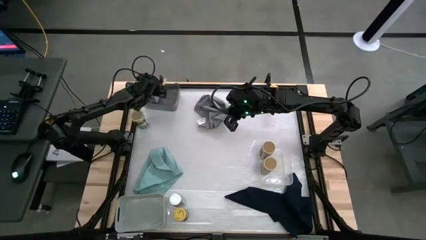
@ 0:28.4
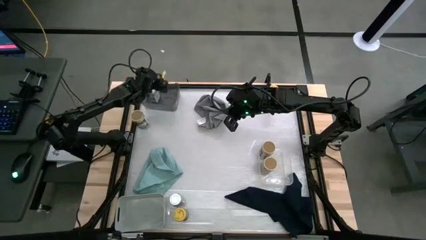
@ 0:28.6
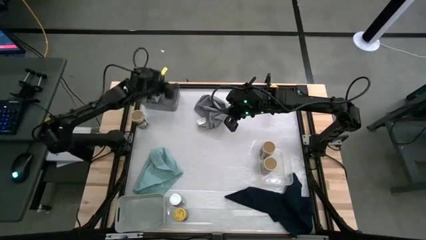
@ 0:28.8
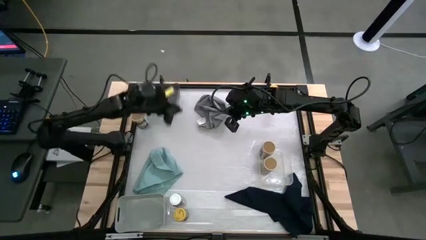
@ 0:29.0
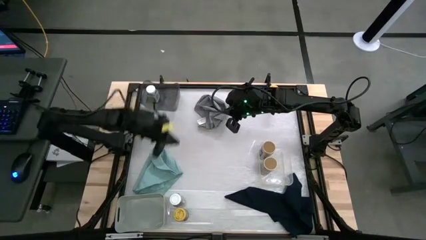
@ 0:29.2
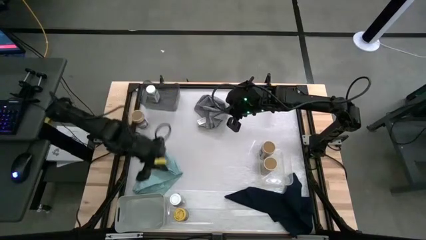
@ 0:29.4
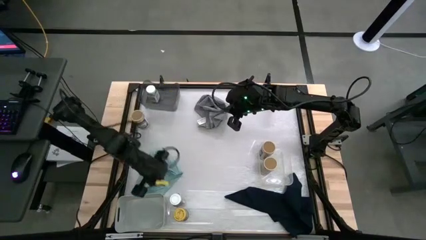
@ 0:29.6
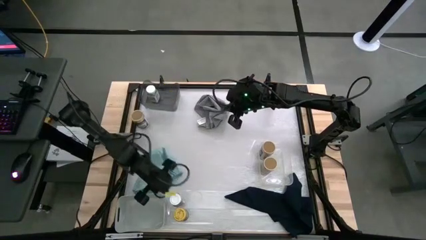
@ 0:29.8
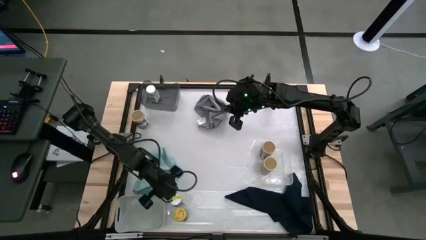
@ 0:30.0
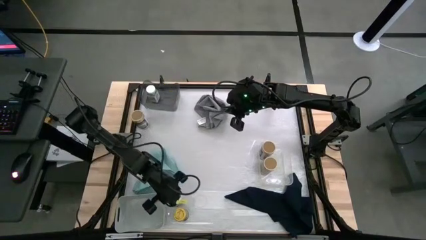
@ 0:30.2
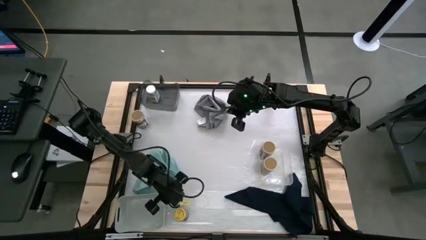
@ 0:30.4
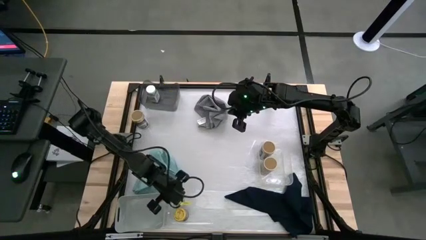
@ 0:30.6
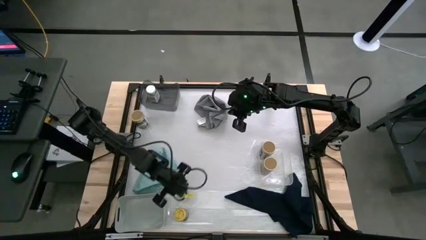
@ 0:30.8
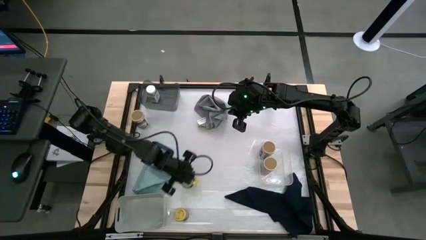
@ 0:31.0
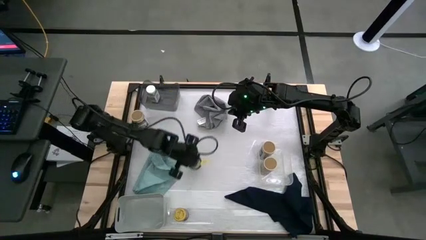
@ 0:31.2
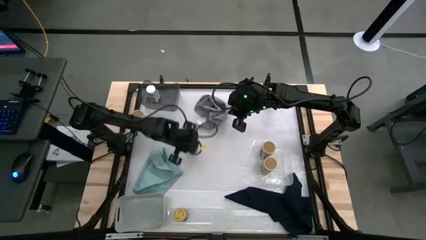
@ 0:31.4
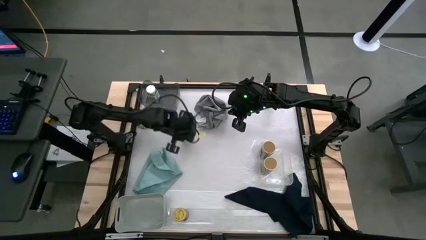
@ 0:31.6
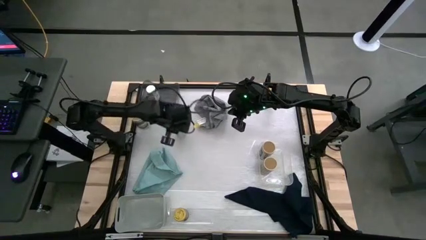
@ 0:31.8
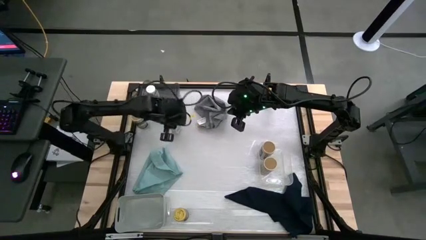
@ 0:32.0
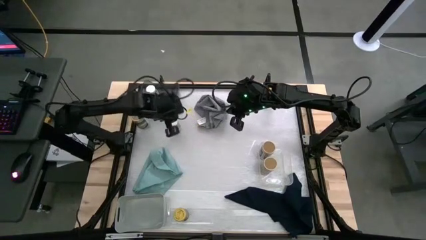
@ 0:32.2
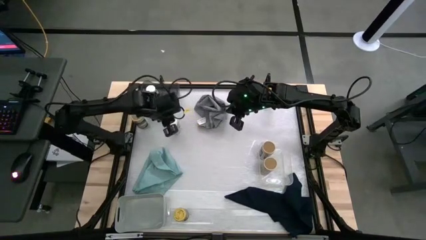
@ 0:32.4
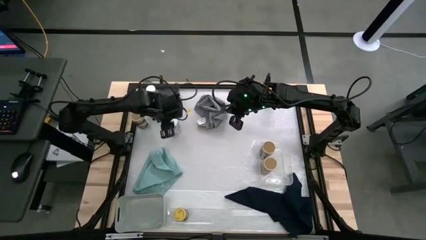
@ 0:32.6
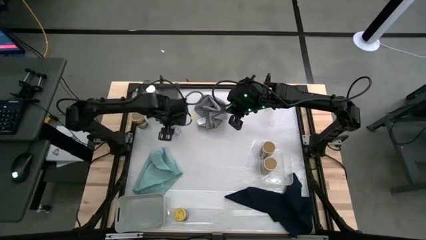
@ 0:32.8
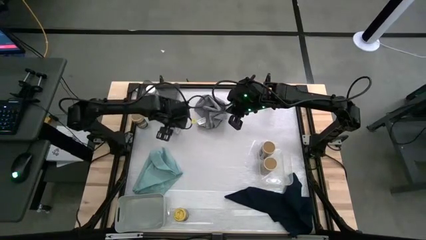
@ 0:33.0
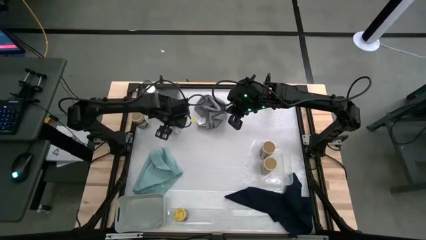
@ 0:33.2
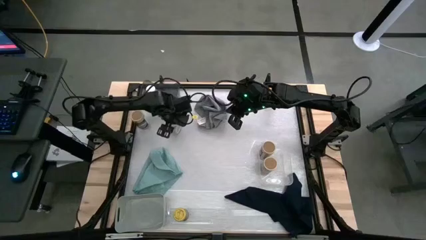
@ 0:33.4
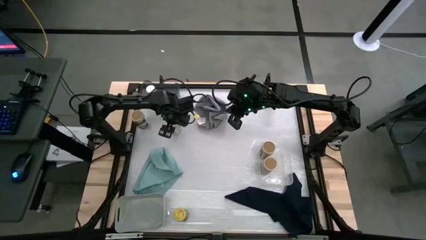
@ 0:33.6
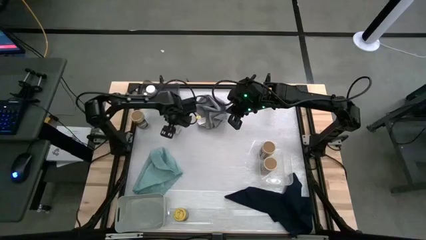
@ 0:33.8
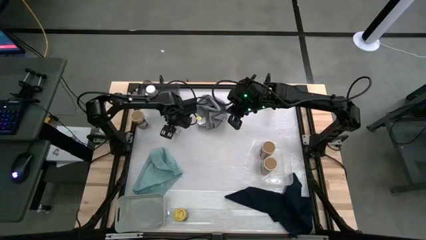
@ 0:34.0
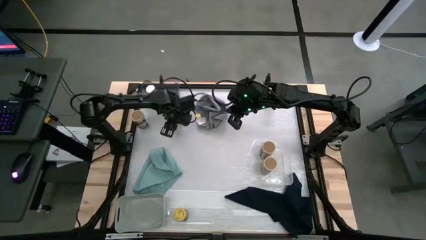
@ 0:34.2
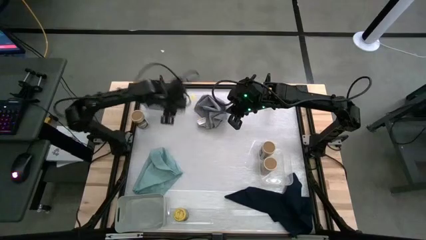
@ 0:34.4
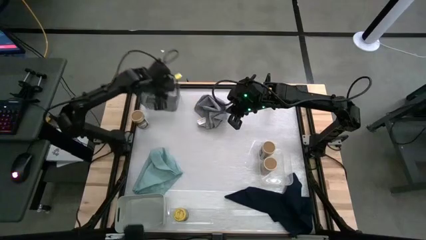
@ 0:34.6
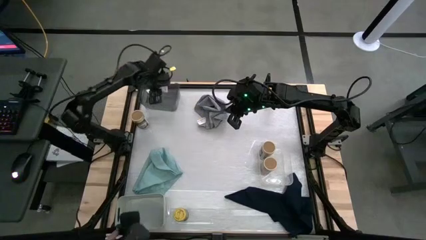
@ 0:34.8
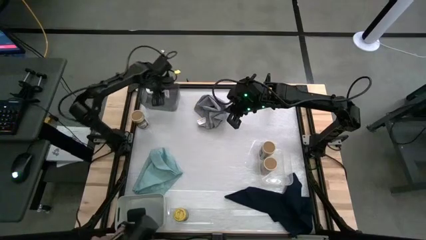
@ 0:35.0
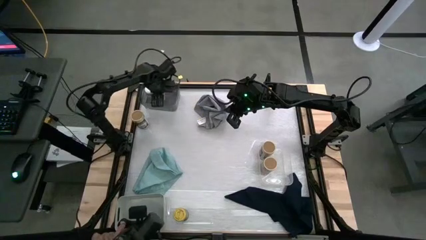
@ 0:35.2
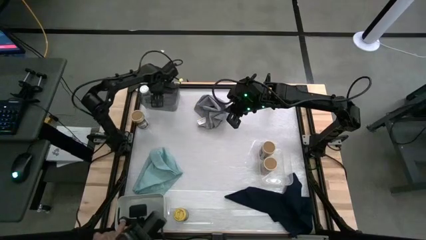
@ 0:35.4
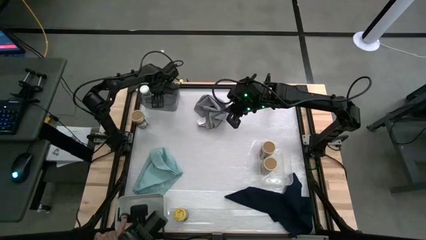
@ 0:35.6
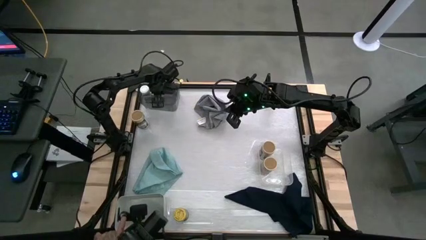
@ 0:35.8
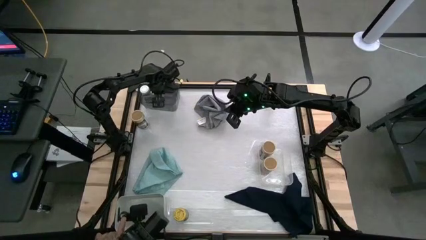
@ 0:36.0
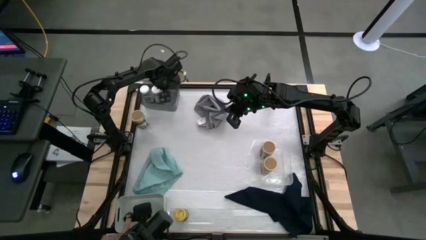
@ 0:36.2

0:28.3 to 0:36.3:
Task: Sort spices by type
Put the white seasoning bottle into the black bin

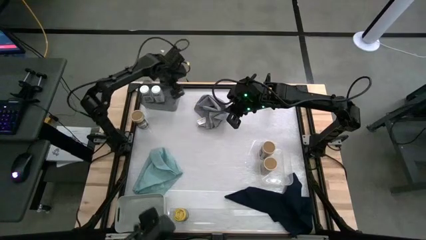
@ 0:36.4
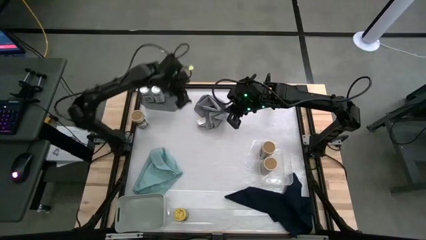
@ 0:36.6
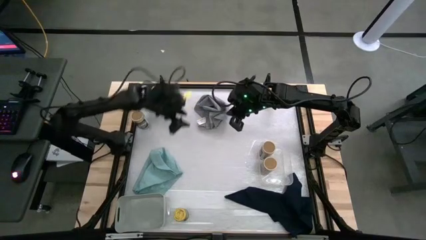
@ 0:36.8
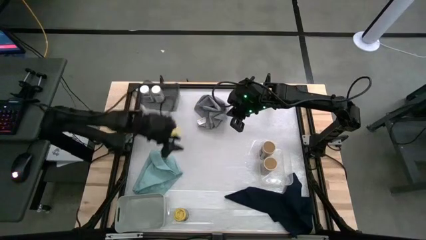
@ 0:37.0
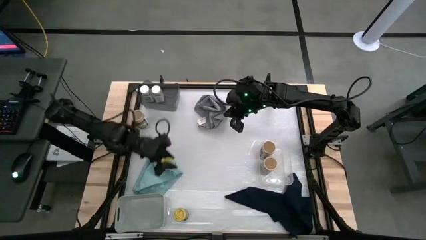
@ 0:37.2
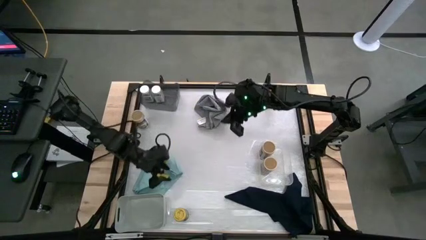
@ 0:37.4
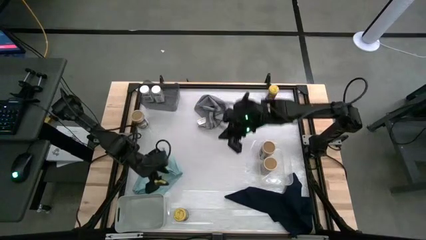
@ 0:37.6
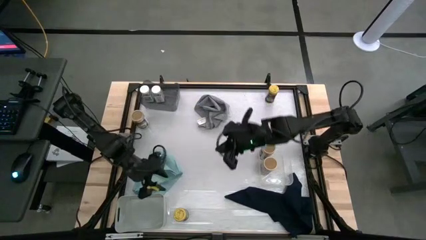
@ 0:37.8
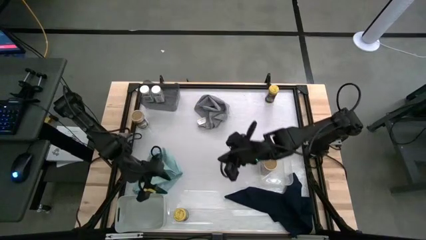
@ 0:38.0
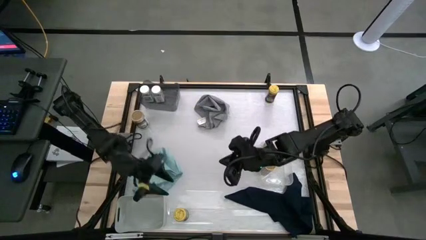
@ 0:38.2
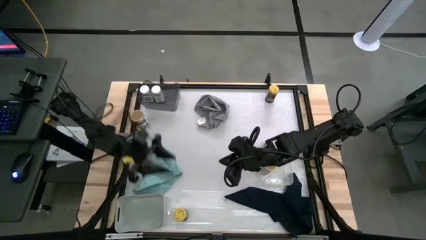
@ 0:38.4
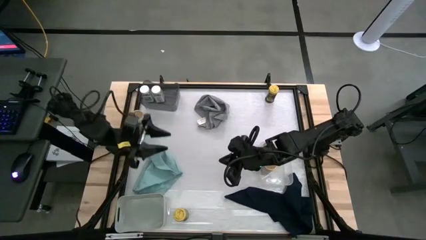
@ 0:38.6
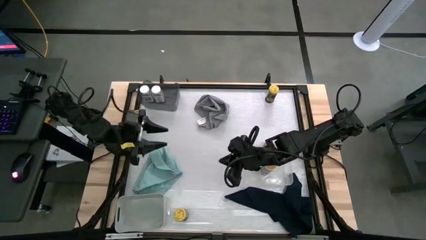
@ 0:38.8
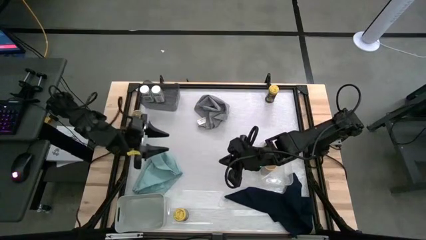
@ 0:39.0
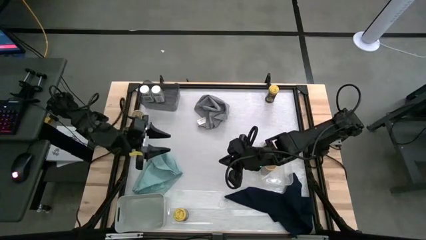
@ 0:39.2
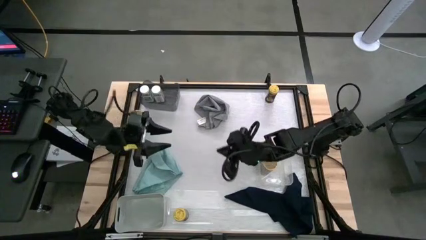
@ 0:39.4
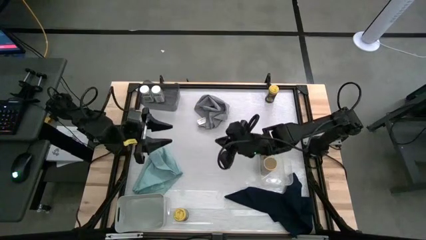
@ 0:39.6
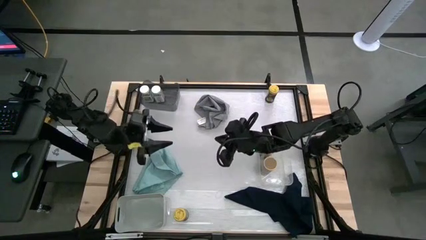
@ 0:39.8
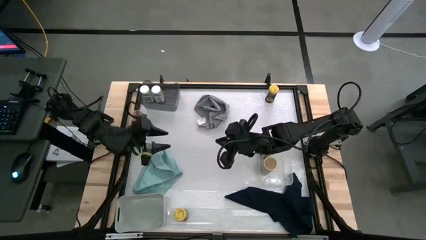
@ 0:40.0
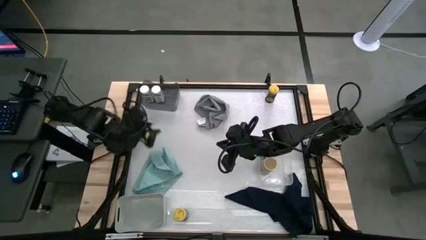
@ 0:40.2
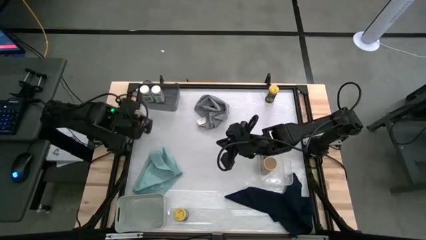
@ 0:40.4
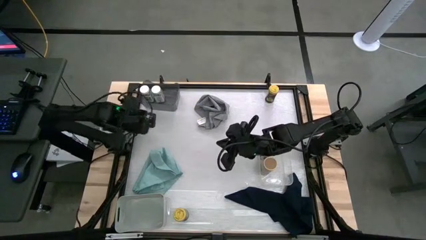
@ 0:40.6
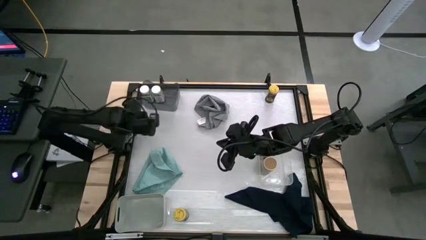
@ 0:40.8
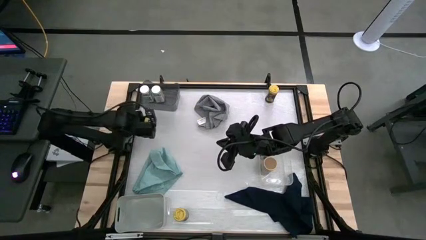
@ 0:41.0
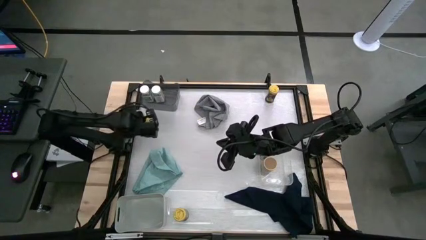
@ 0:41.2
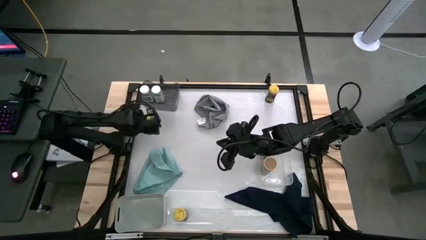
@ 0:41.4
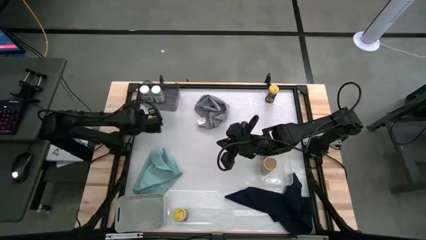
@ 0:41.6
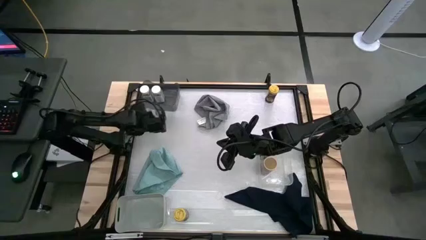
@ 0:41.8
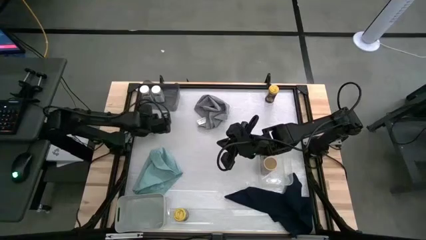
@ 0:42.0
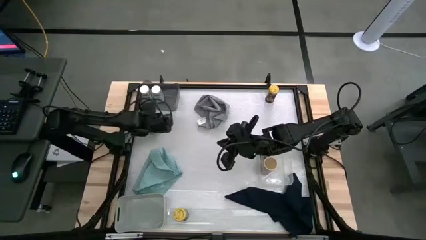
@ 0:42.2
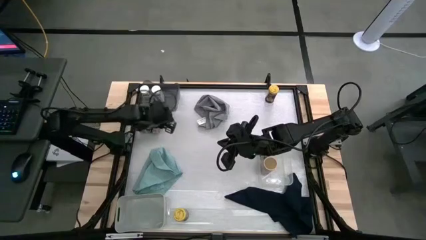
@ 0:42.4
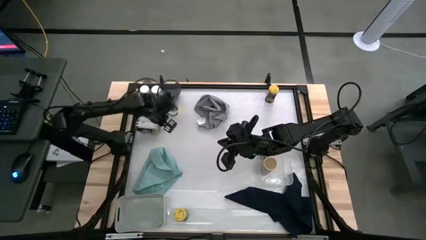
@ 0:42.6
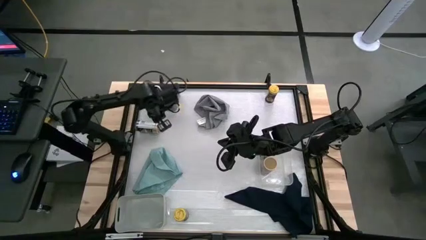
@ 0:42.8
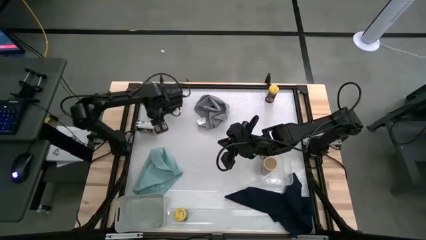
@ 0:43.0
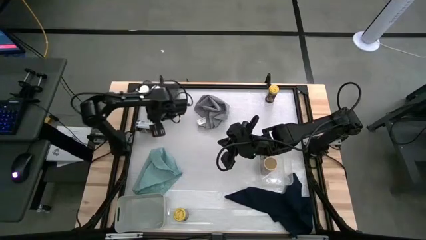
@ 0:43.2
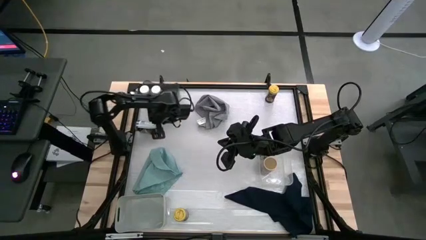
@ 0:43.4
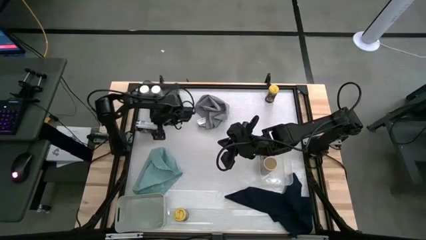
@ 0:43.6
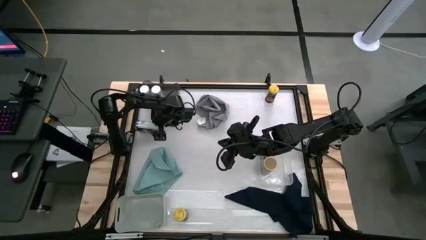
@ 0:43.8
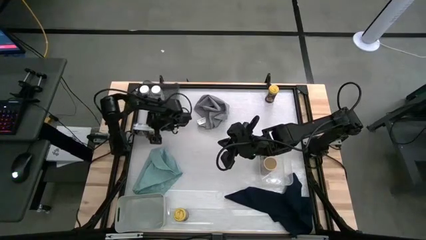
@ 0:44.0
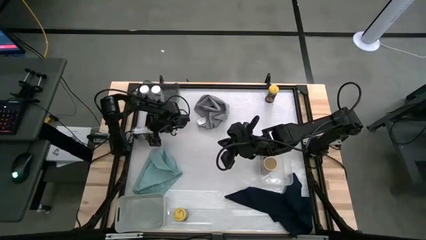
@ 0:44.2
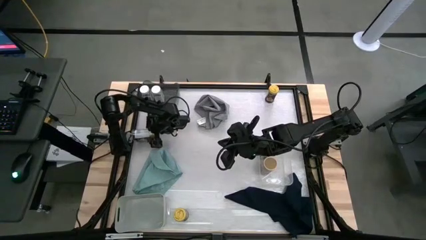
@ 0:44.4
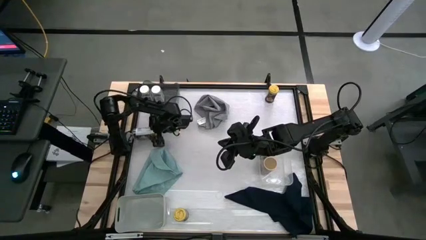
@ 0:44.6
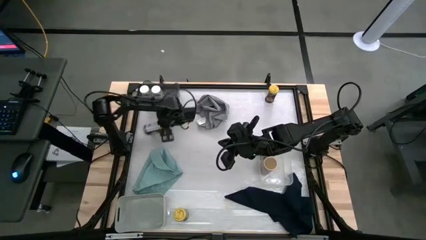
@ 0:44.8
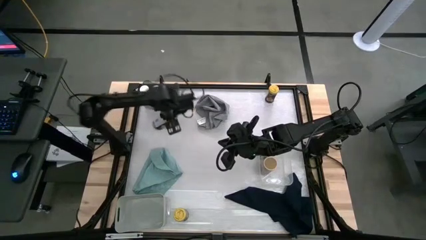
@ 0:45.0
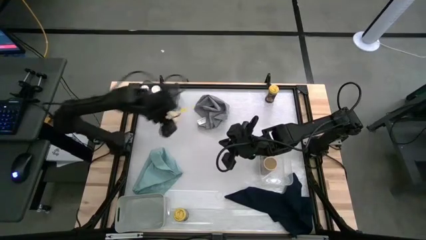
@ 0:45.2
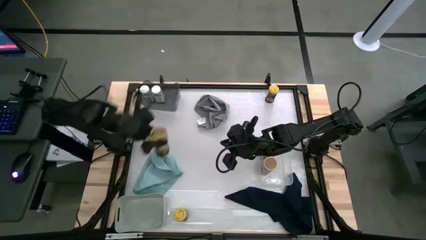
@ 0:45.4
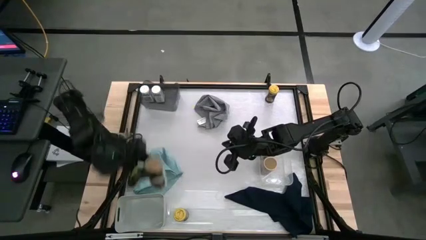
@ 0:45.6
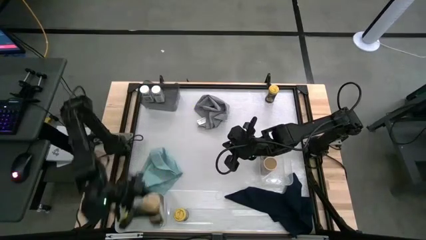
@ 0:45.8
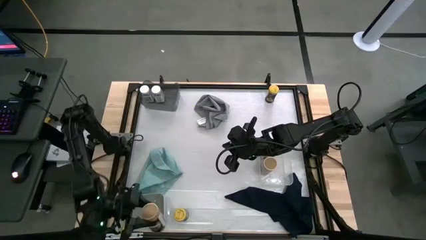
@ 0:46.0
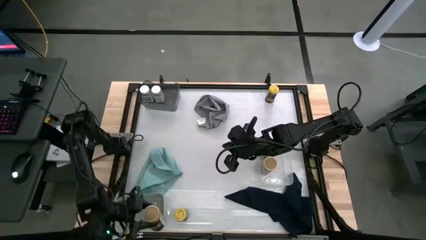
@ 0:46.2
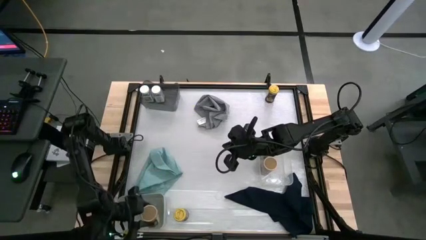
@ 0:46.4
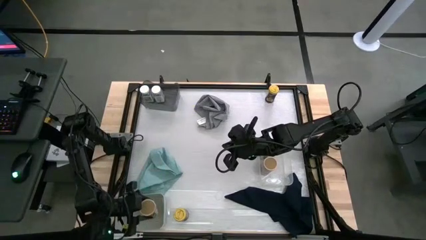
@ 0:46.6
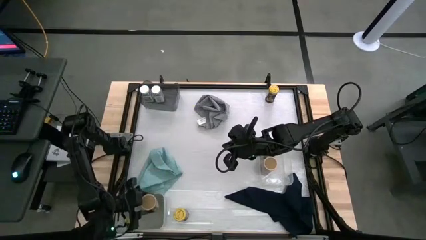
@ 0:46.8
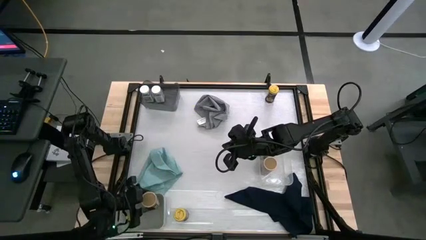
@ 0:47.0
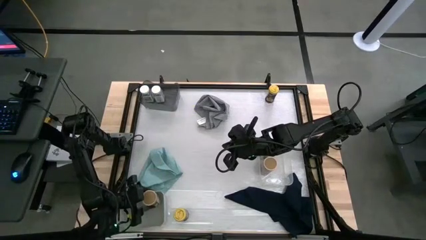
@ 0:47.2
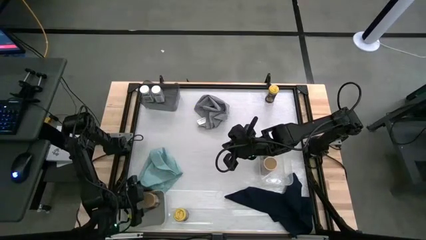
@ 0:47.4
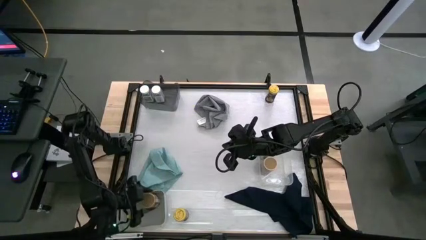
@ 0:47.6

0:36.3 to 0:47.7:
Put the brown seasoning bottle into the transparent bin
